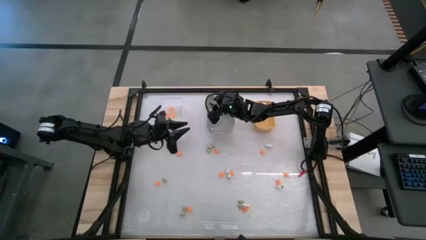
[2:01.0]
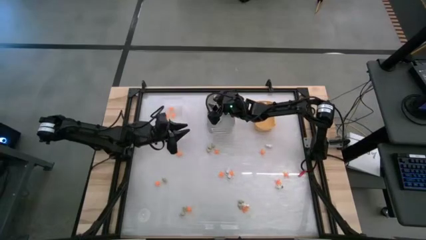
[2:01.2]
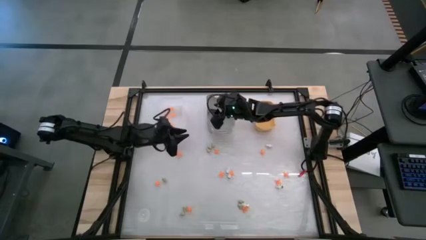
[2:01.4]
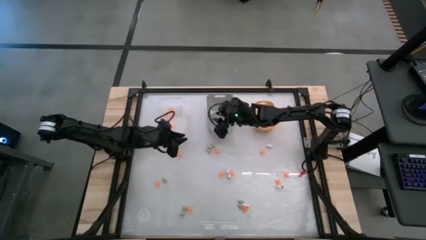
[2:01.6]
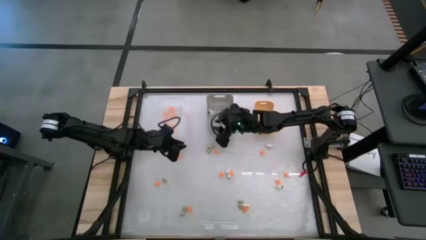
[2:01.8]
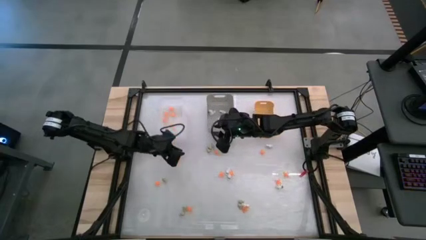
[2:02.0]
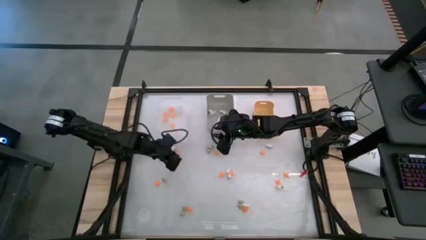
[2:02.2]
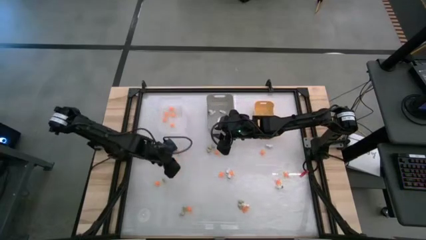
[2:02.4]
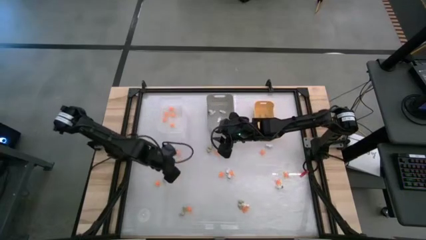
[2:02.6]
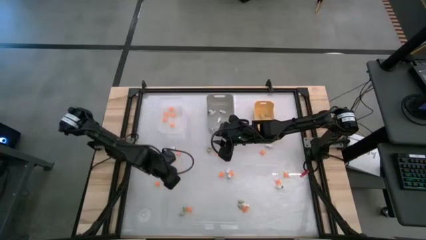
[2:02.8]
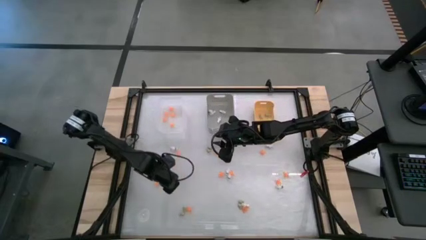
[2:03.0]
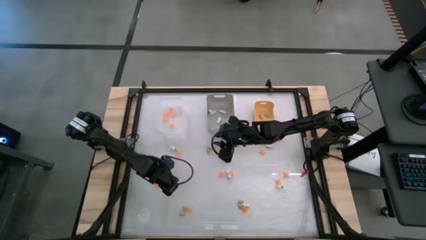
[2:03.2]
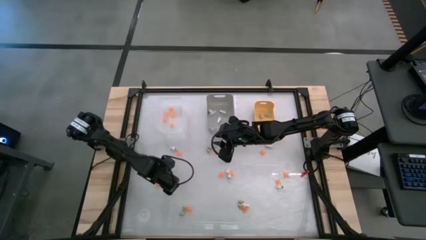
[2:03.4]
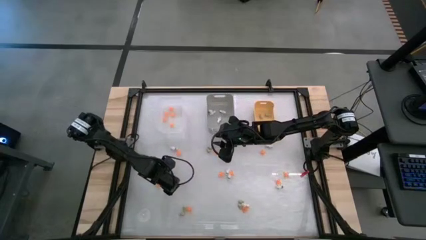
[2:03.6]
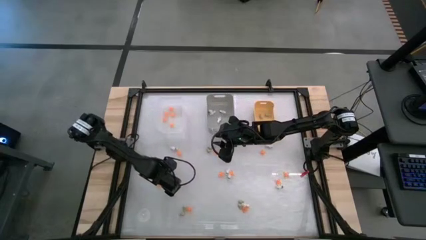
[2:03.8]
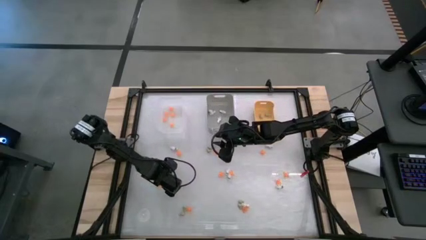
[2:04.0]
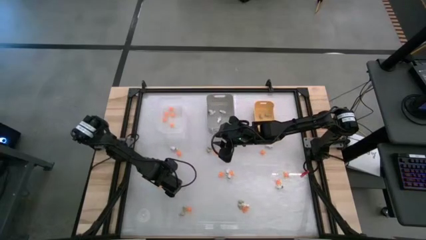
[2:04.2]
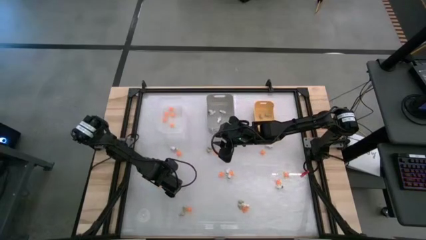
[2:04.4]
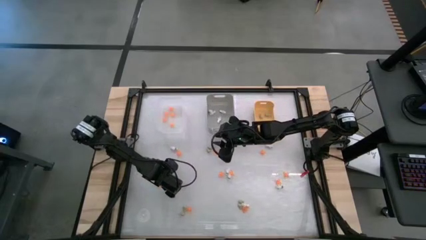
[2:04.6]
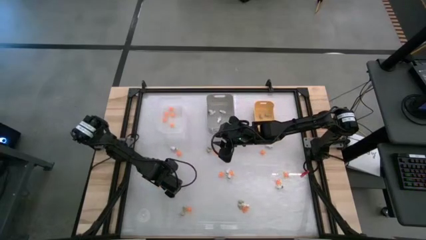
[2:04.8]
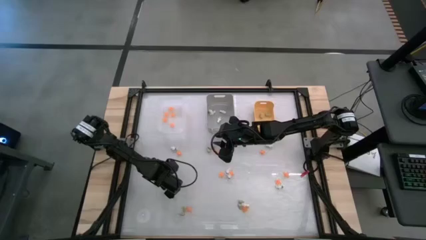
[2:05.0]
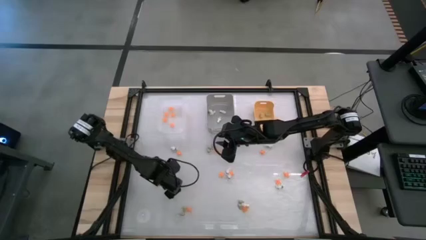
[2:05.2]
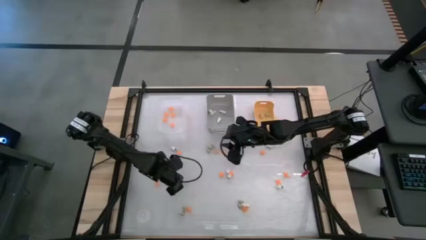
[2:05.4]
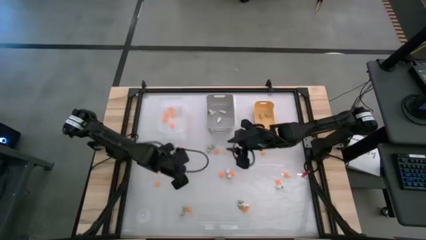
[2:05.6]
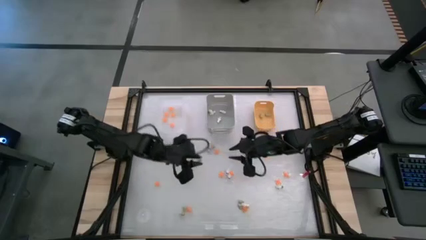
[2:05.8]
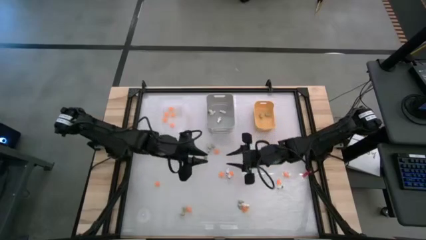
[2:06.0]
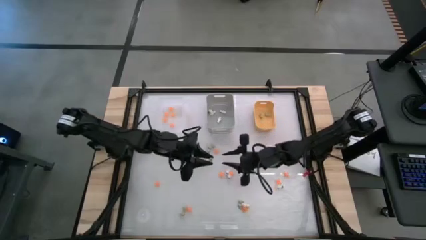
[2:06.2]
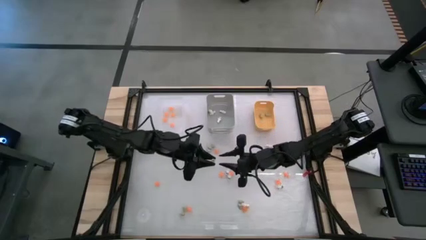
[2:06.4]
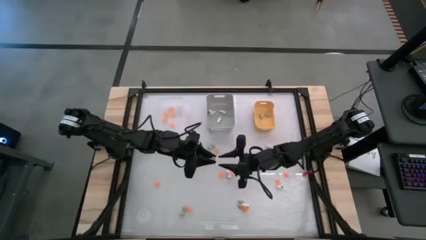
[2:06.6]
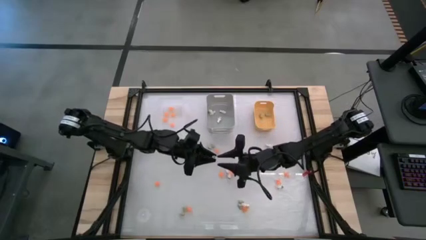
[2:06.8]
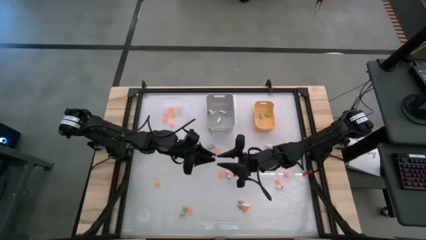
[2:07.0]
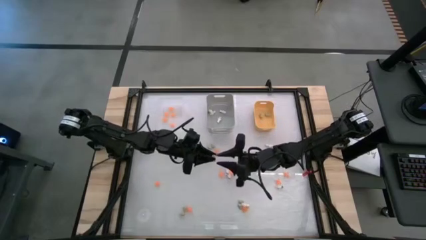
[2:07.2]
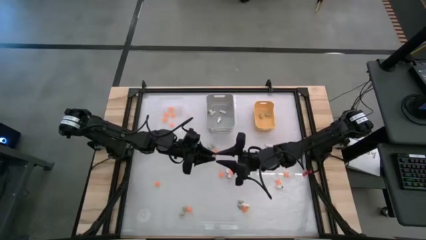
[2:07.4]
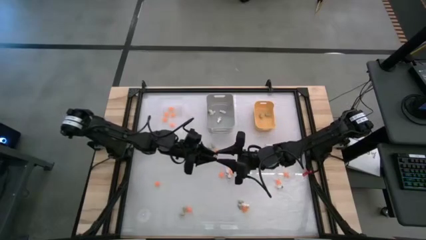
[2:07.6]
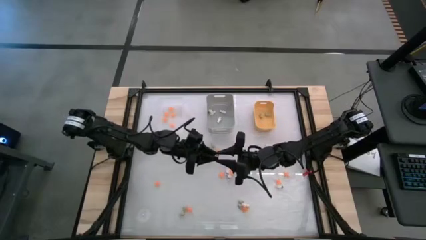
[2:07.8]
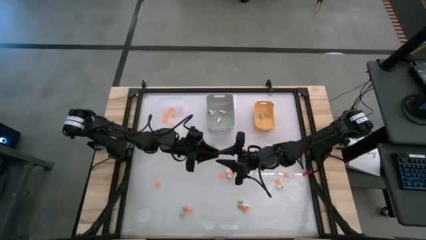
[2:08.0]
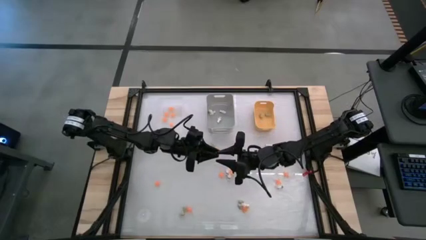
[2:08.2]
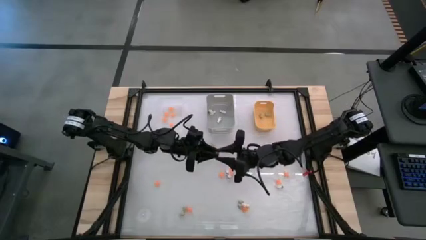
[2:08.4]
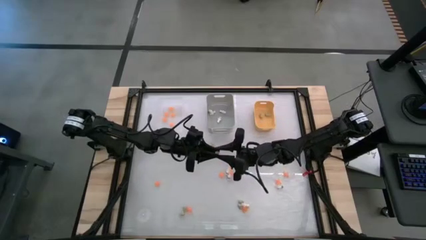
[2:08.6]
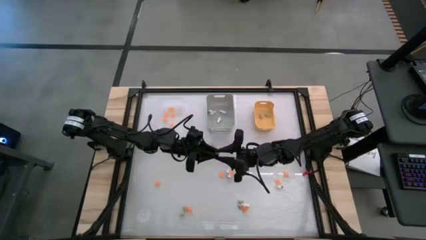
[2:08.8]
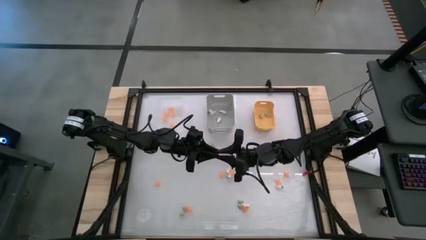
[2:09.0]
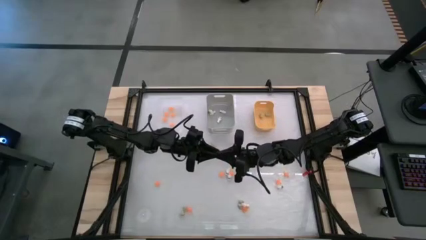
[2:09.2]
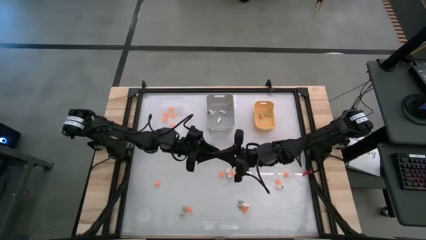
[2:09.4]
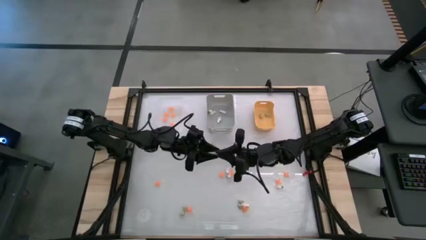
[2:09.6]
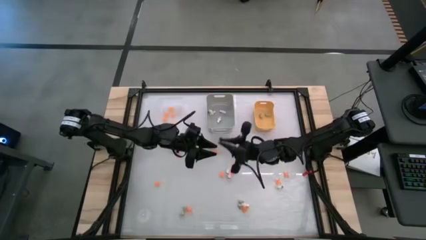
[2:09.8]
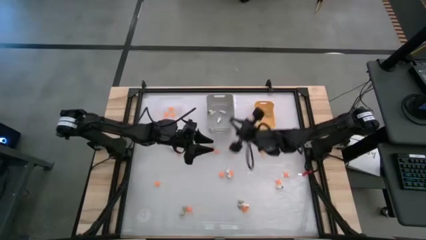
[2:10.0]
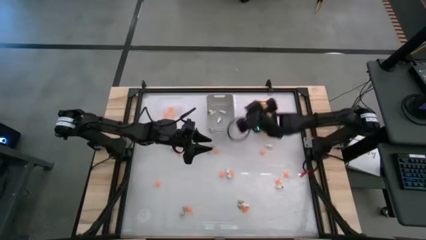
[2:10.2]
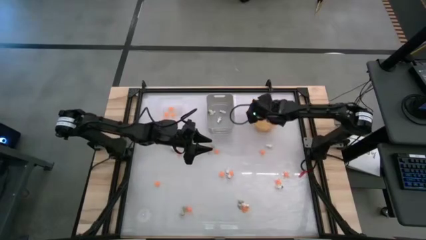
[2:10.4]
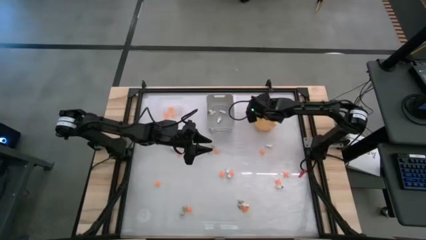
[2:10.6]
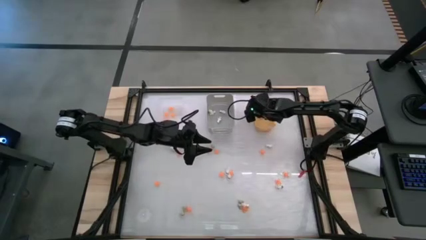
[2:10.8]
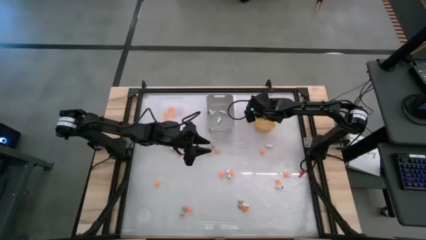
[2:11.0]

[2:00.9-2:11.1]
Task: Sort Halloween decoration
Put the cream white skull toy into the yellow bin

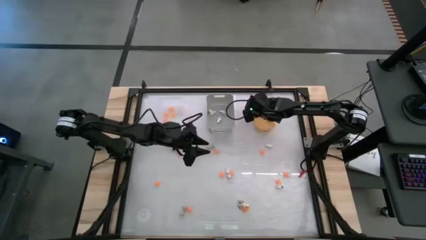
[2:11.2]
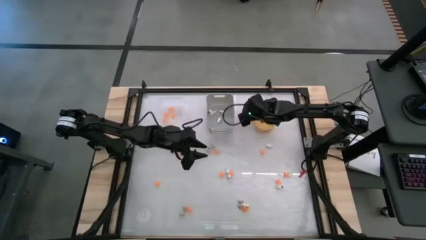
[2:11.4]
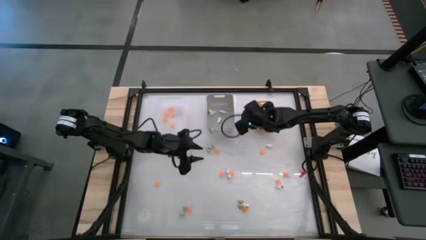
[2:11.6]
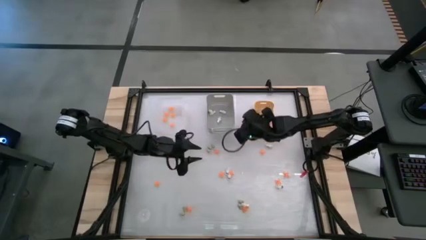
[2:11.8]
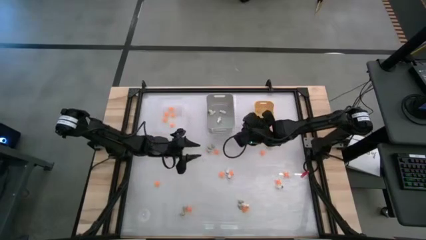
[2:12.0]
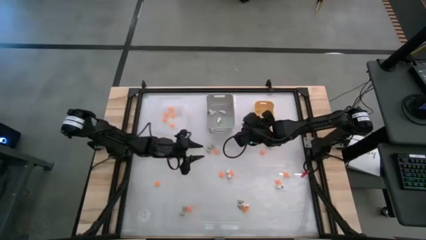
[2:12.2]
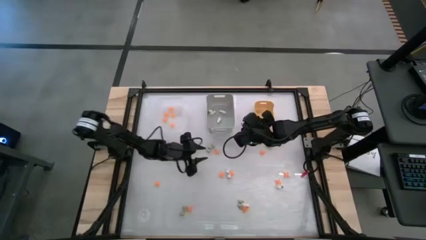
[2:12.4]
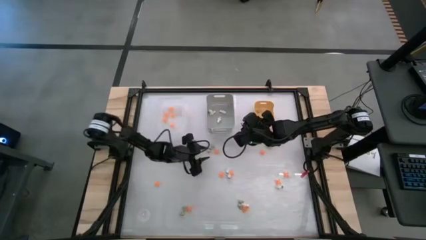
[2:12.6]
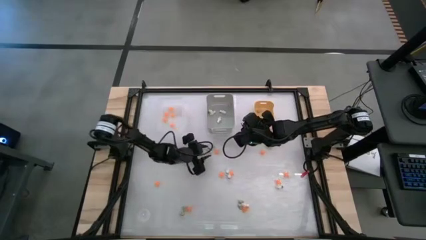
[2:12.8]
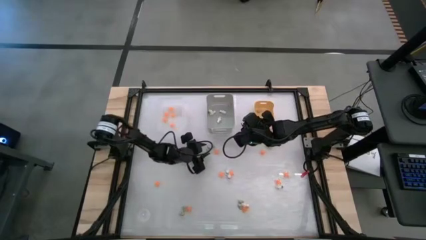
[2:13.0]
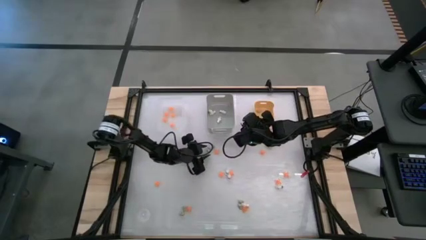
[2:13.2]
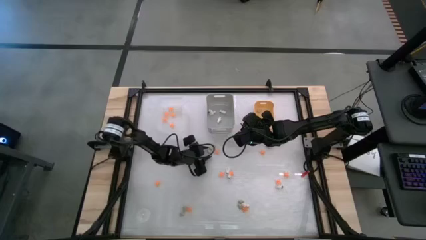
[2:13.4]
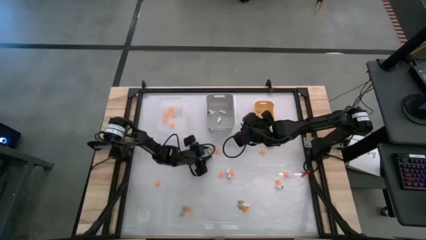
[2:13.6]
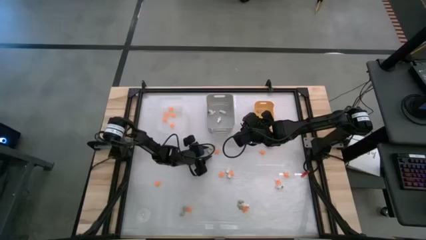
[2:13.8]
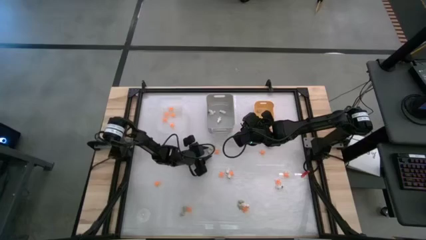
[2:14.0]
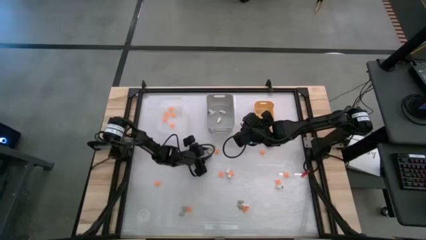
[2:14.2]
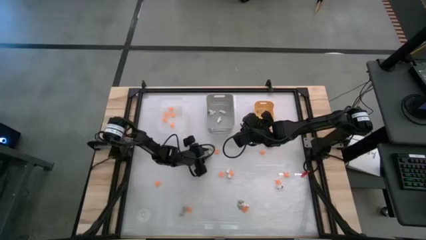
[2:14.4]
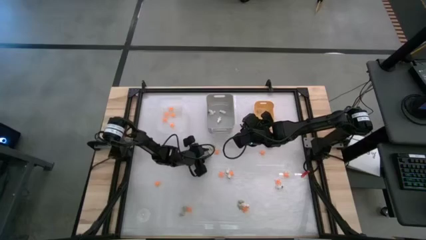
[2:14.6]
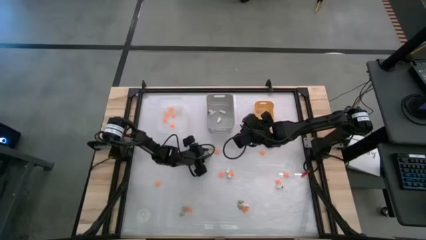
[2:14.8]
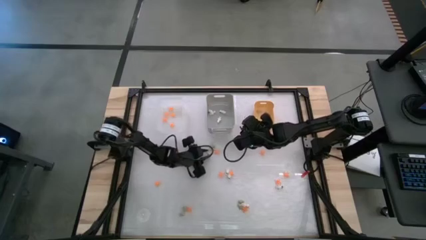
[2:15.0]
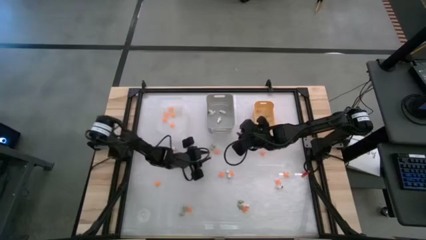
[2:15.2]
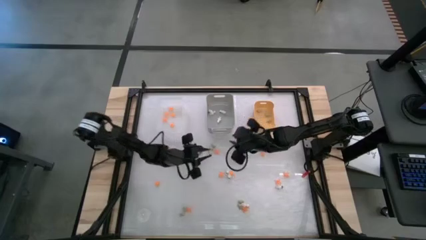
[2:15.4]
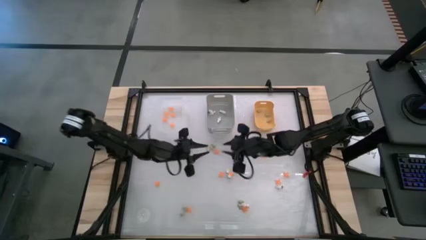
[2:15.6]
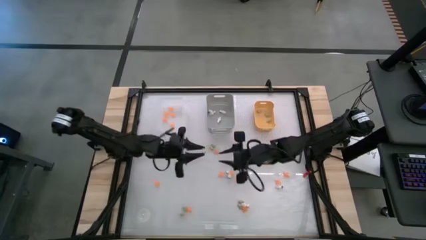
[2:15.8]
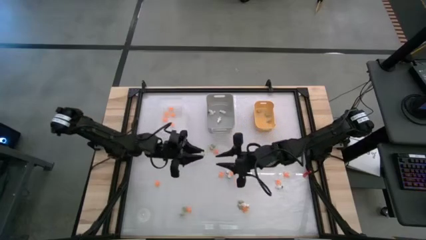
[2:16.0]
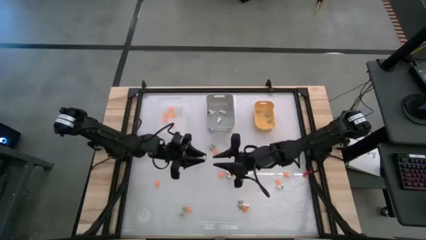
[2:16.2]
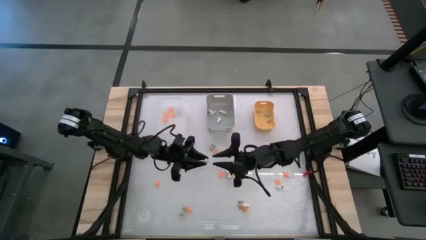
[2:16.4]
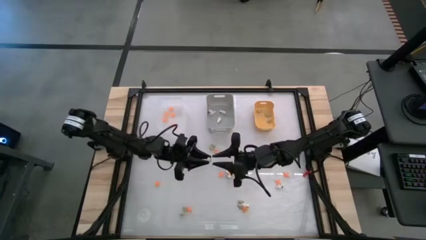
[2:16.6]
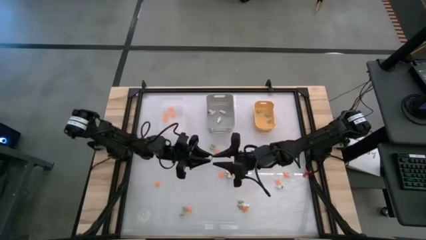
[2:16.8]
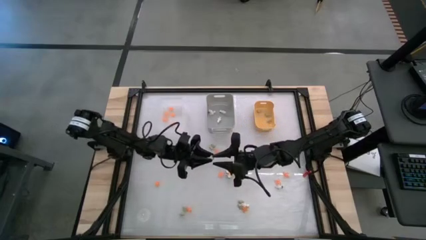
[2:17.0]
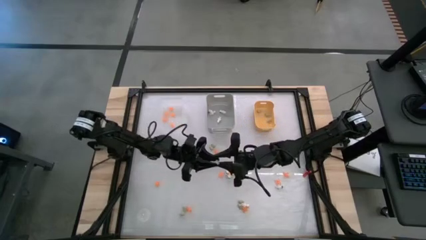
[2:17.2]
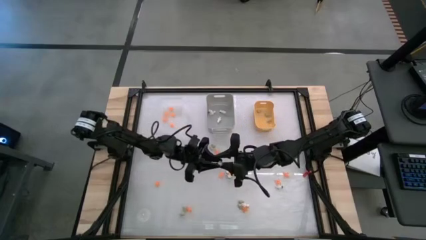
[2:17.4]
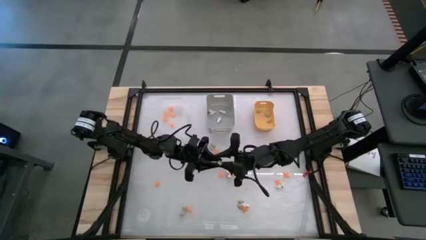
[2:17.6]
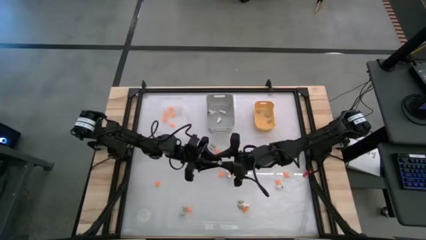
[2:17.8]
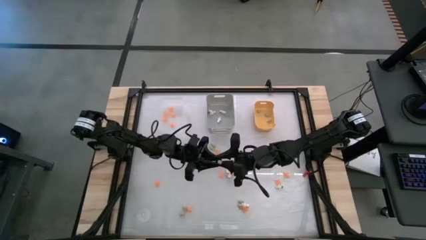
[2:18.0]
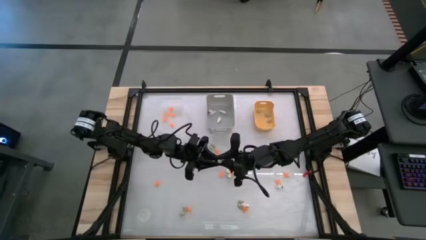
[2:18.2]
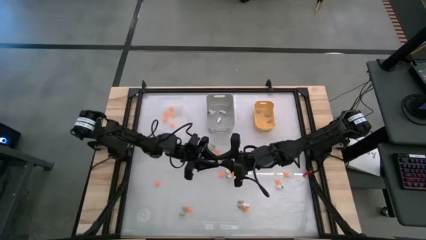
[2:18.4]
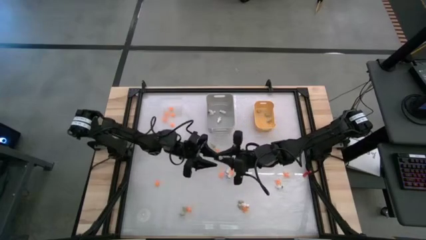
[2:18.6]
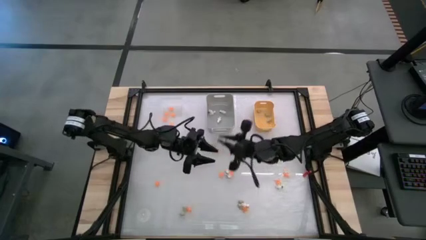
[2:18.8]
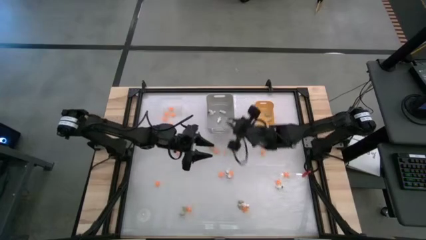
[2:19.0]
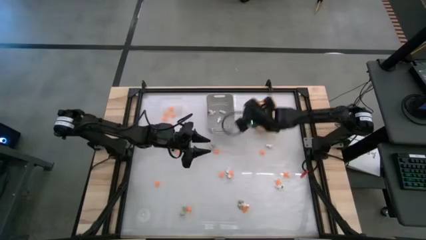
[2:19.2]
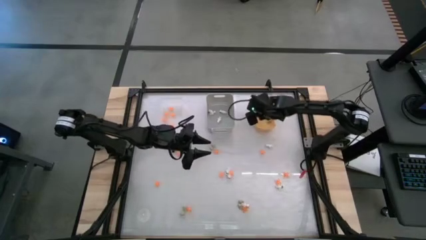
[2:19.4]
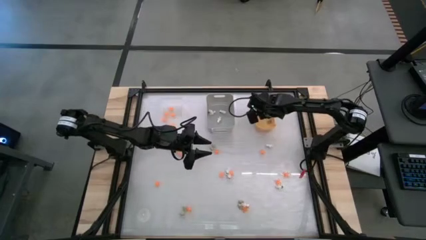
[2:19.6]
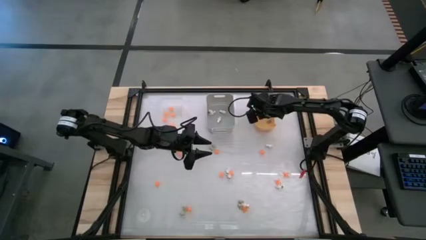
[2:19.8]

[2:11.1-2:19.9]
Put the cream white skull toy into the yellow bin
